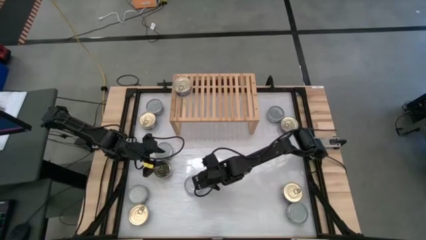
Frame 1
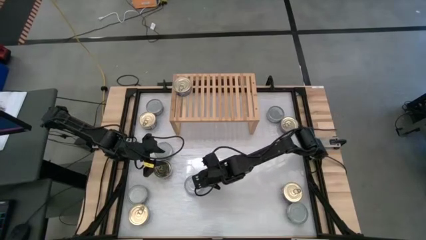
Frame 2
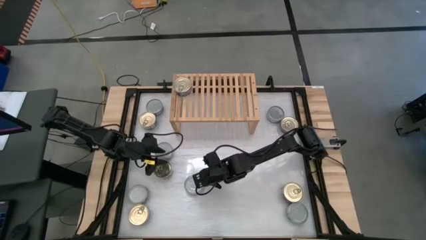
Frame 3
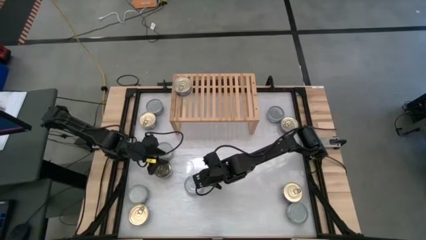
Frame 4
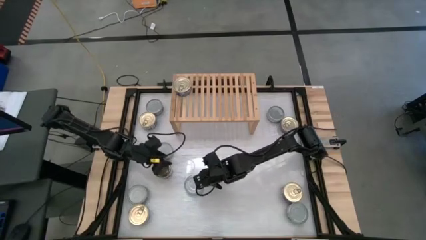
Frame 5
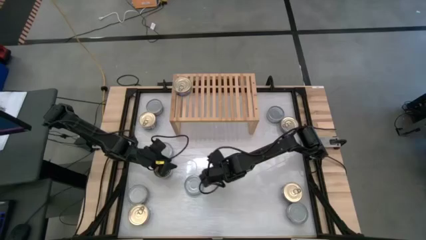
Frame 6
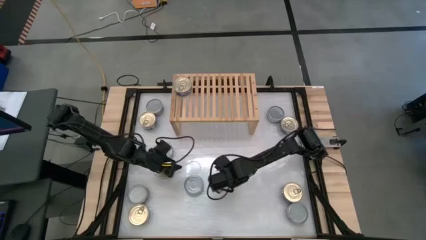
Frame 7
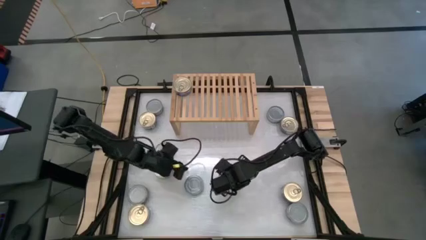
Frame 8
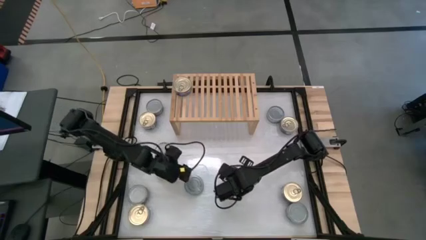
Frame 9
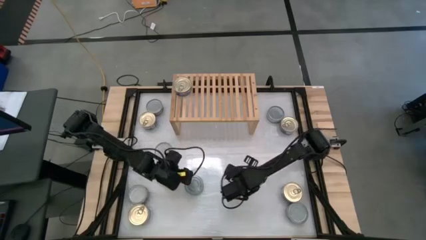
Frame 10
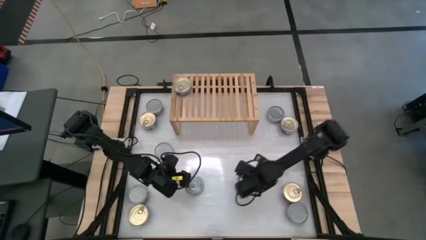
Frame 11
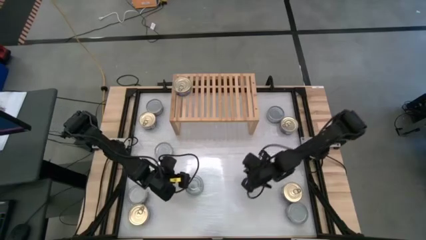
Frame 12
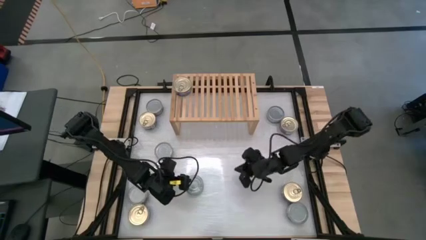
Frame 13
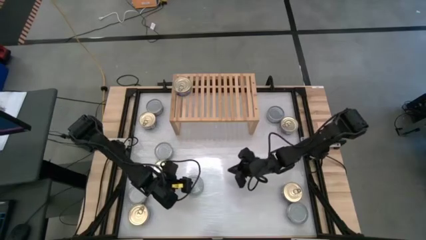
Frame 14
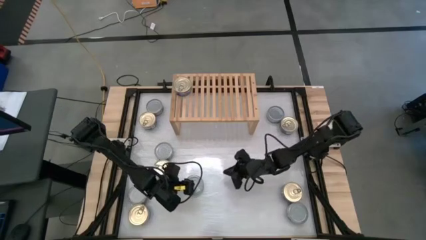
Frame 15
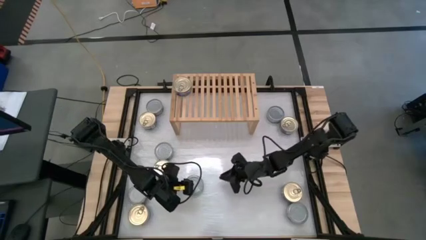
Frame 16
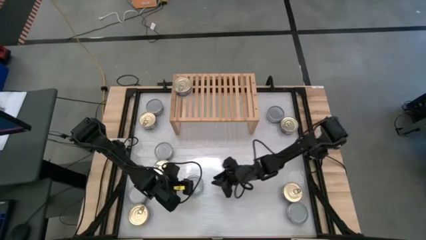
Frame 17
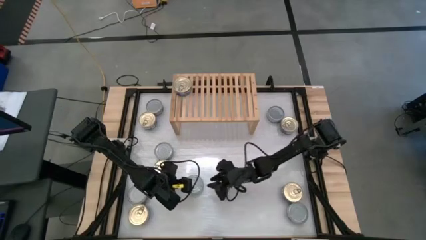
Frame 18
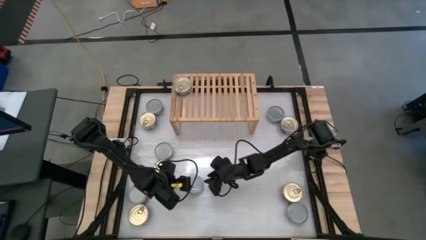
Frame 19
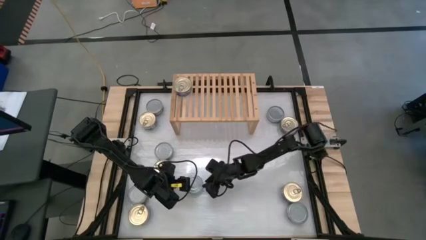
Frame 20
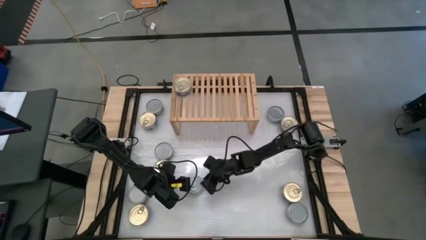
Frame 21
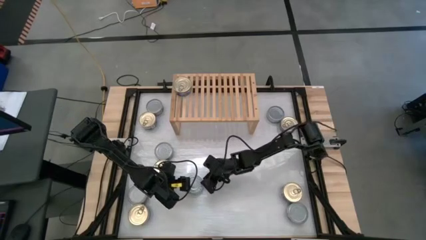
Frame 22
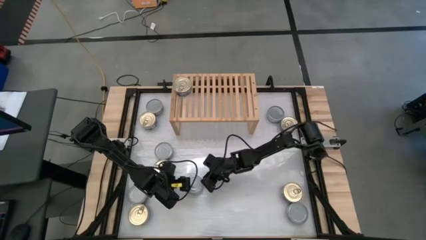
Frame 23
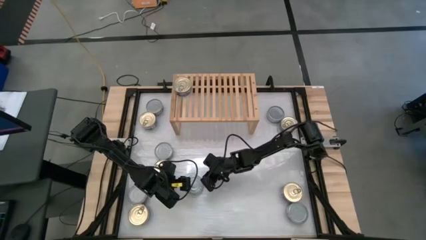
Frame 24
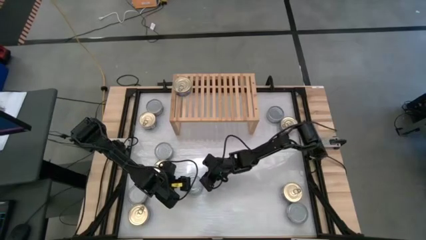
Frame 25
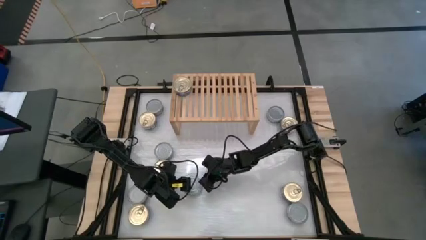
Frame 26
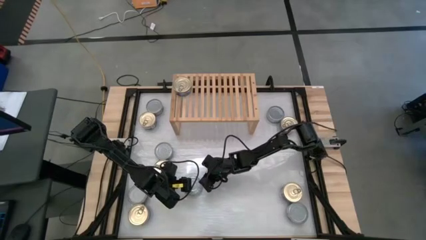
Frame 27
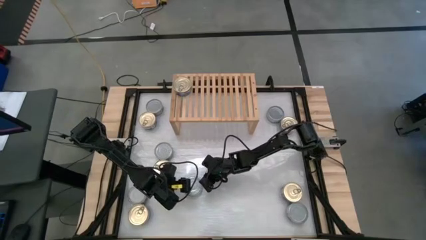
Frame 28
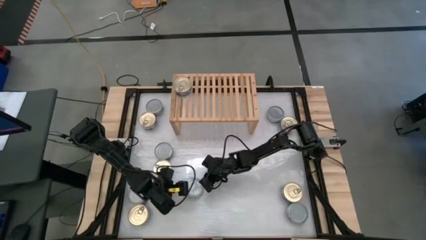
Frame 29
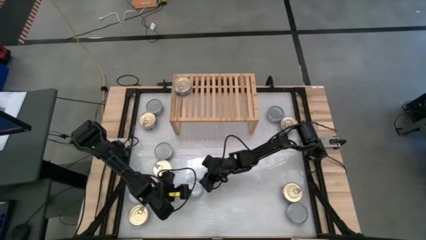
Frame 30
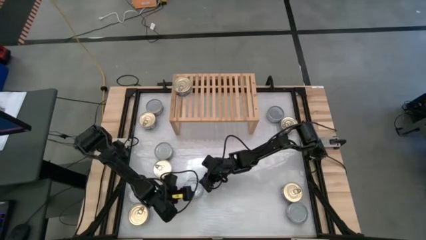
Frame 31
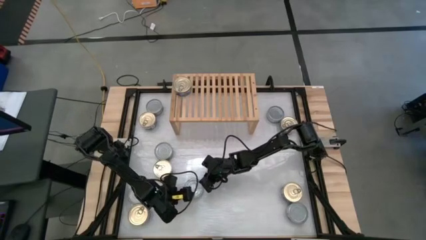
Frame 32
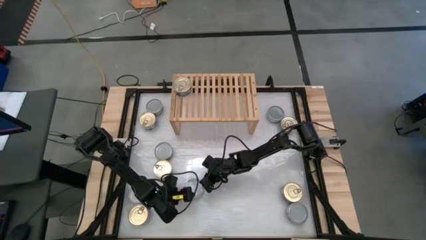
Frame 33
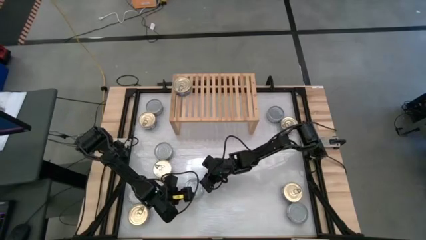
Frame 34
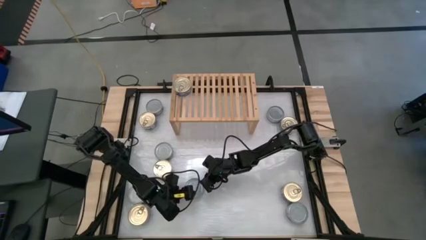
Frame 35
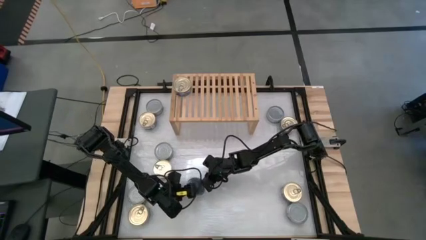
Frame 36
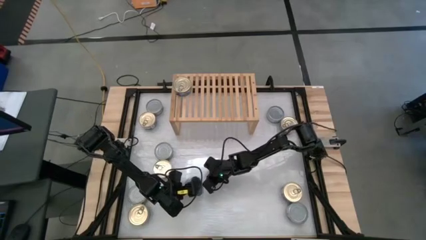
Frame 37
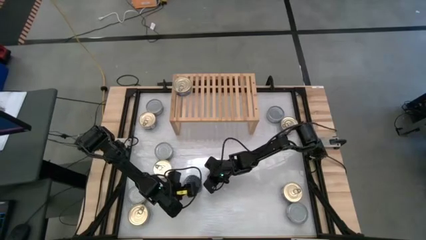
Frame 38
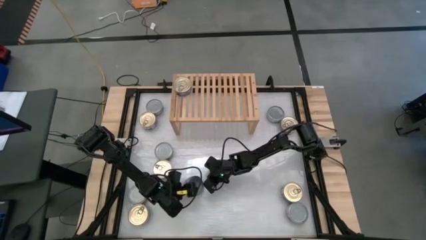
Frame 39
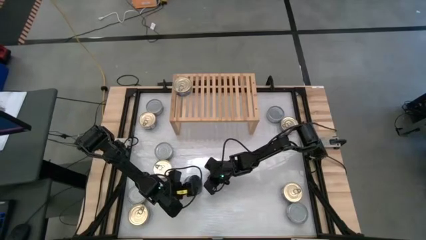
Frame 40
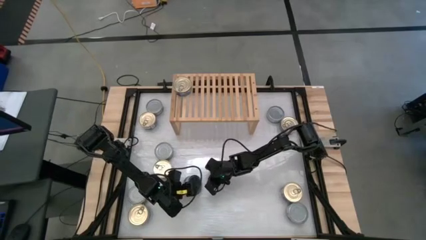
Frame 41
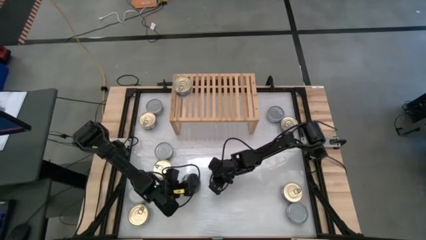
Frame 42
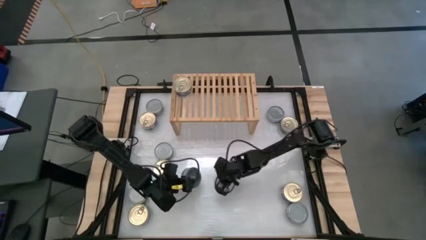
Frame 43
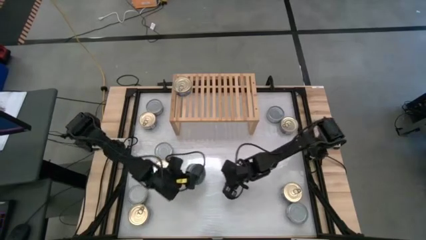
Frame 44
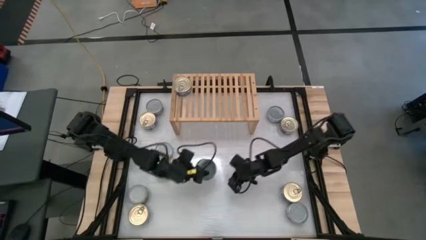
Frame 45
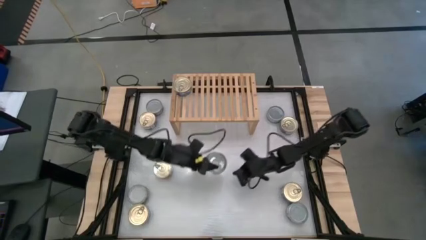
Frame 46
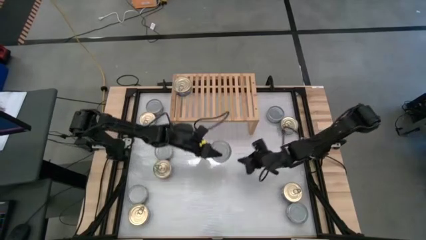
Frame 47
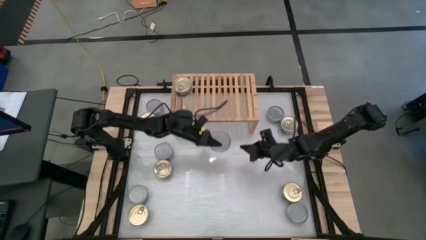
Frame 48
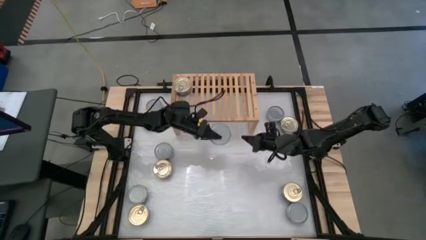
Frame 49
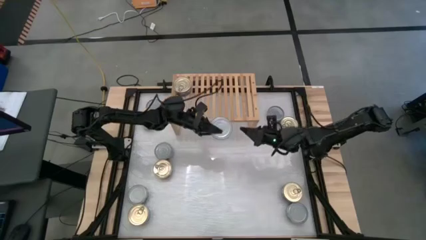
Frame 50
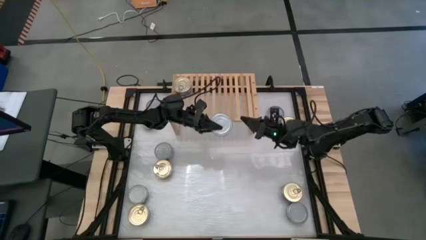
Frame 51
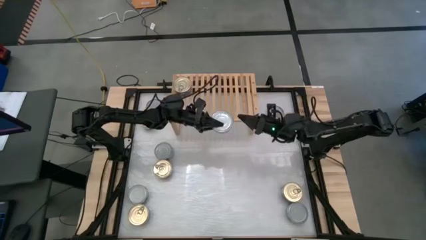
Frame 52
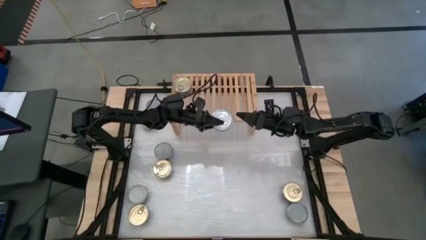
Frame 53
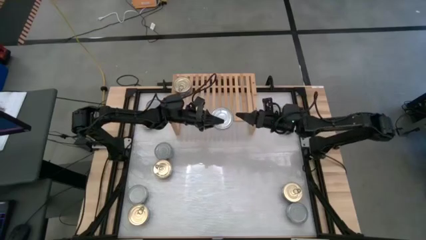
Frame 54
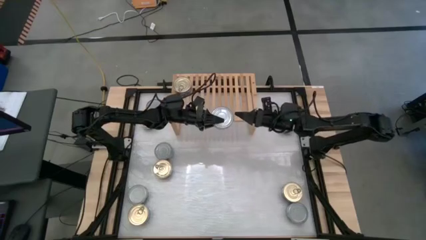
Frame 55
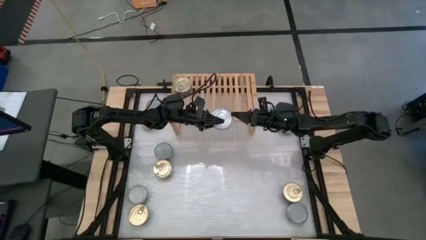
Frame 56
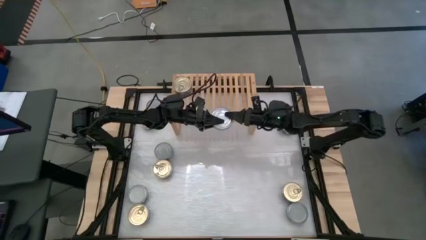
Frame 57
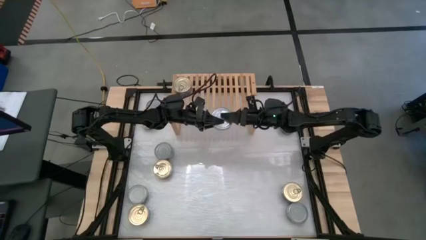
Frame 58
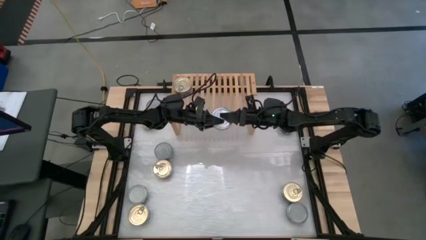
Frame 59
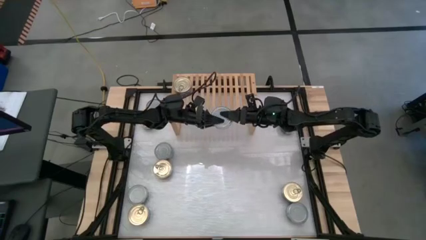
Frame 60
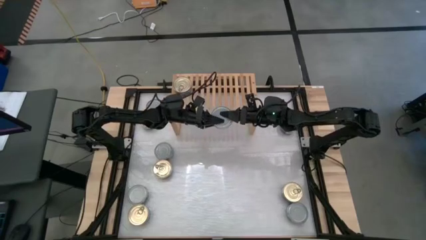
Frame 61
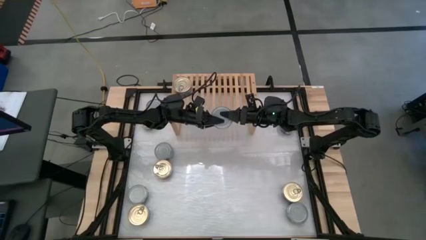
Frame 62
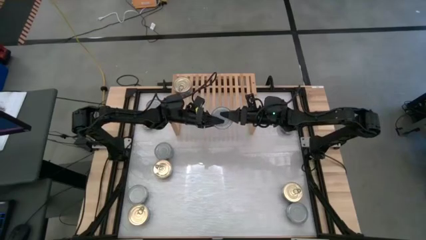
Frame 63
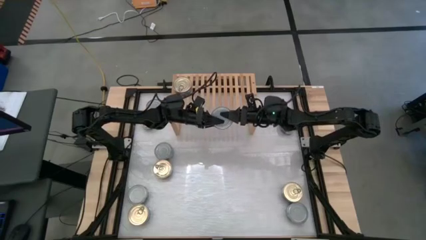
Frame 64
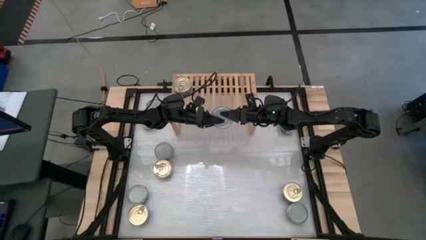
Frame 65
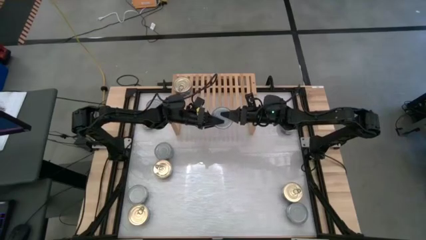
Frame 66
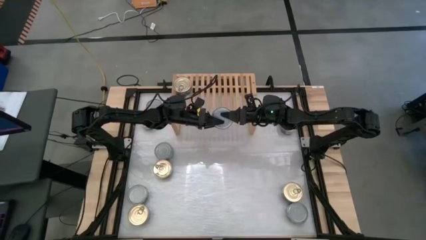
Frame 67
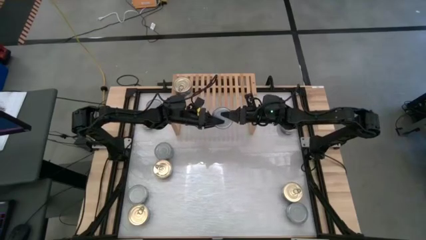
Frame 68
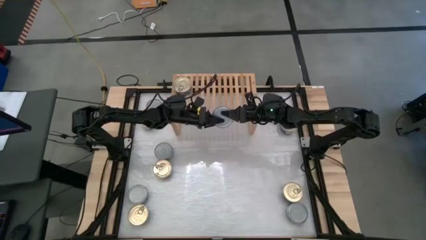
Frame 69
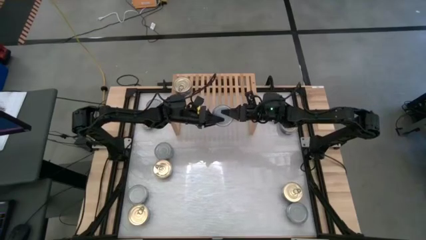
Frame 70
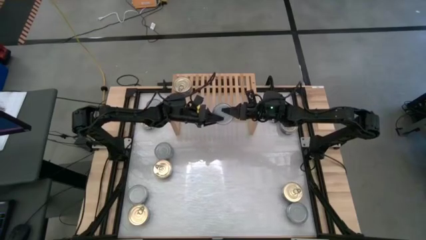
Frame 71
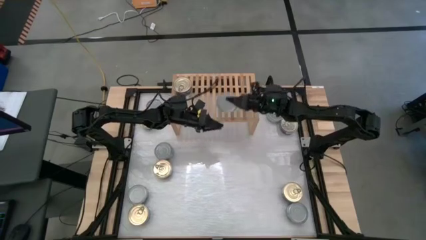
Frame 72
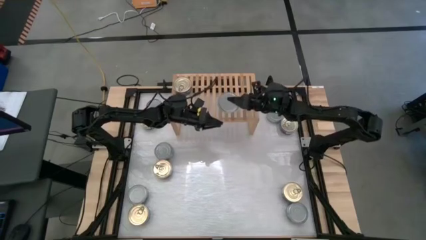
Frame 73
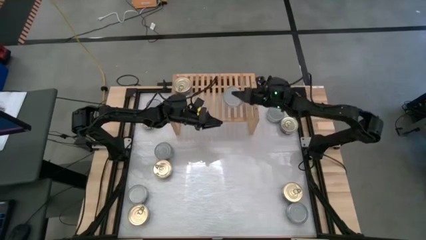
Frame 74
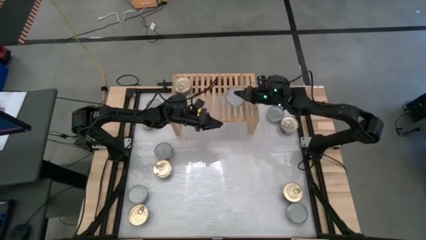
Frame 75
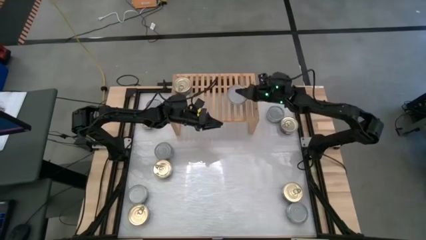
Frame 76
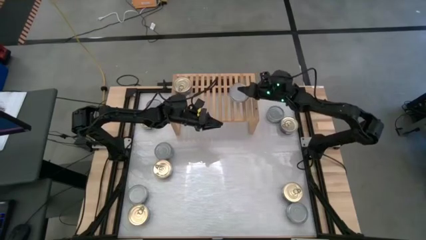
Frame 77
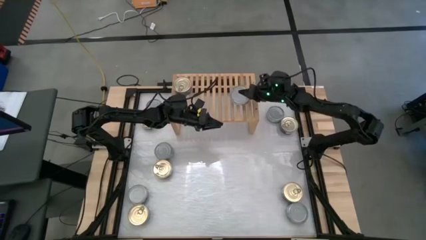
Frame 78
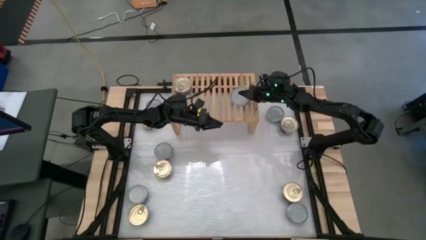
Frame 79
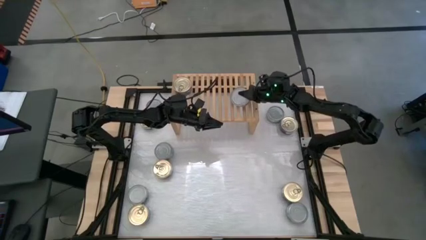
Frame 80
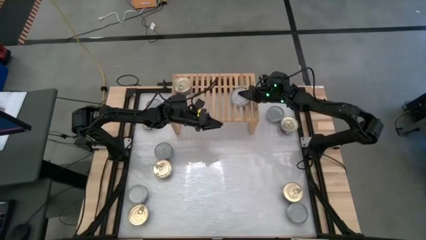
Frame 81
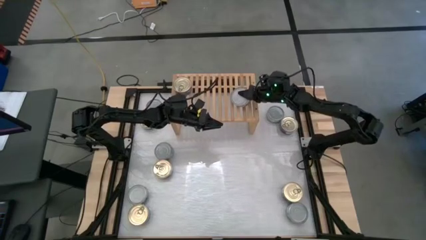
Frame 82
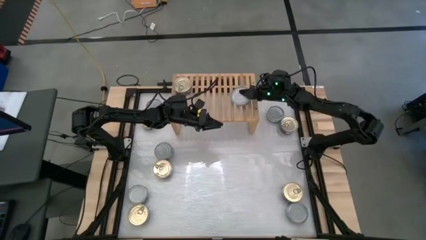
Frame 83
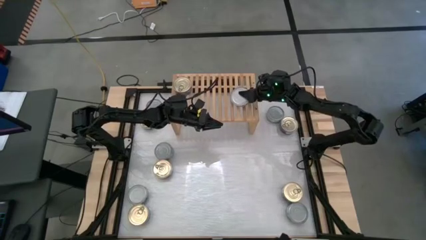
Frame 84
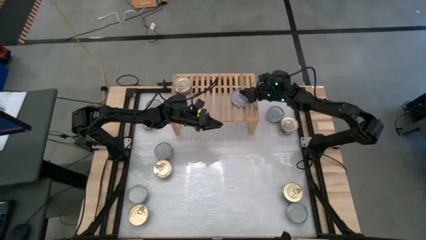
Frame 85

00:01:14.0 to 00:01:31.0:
Task: Stack canned seafood by type on shelf
Put the green tuna can on the shelf
